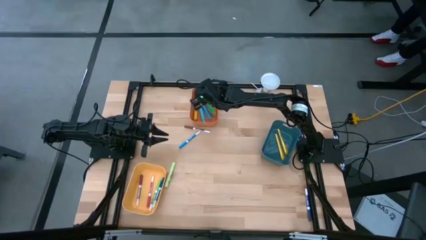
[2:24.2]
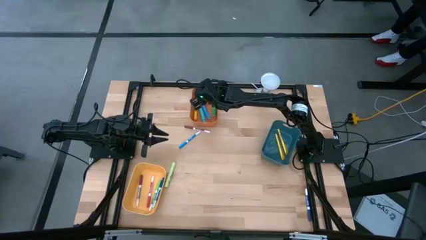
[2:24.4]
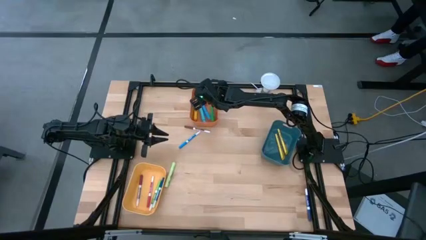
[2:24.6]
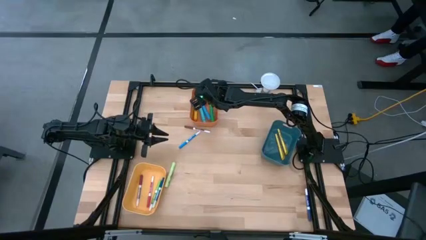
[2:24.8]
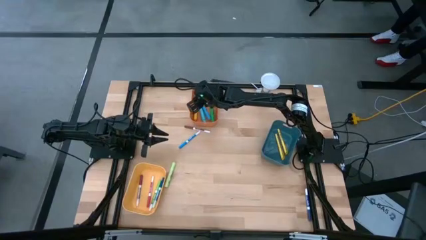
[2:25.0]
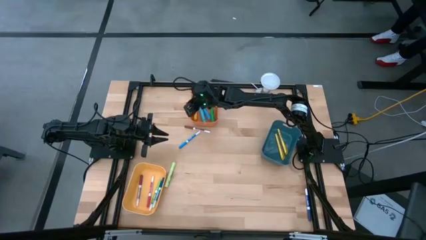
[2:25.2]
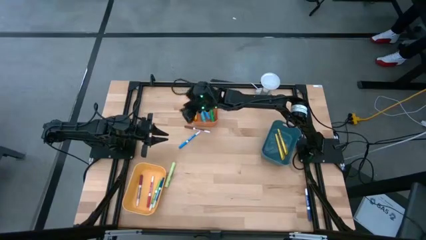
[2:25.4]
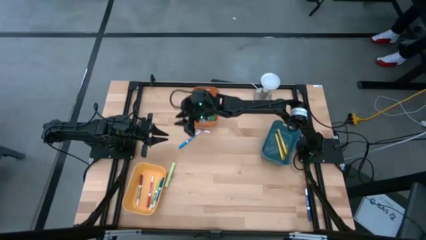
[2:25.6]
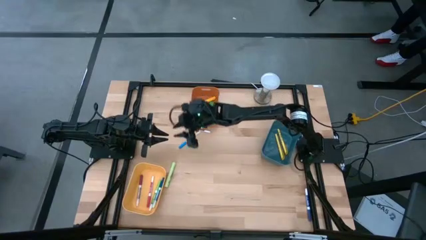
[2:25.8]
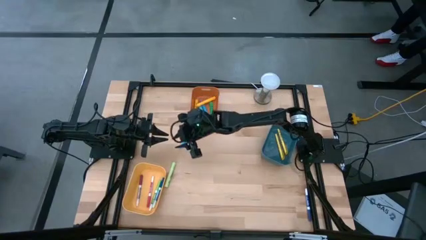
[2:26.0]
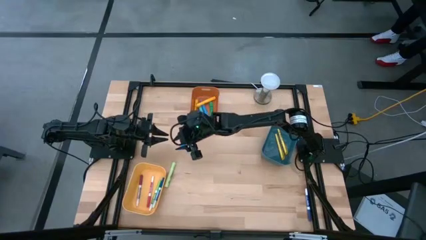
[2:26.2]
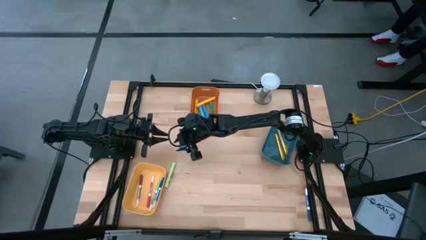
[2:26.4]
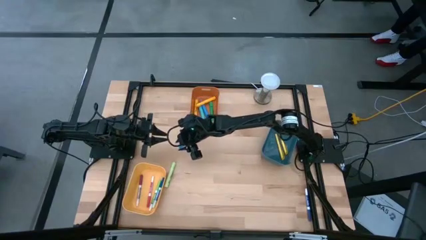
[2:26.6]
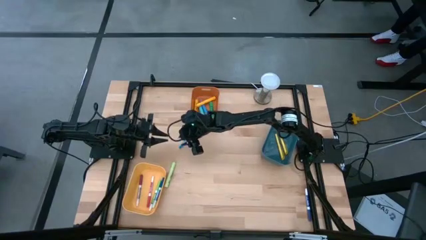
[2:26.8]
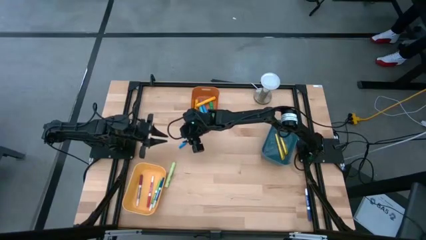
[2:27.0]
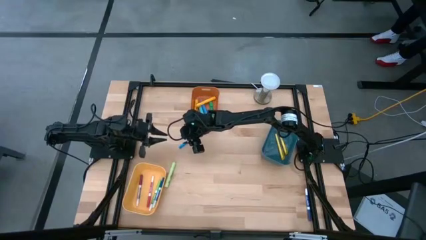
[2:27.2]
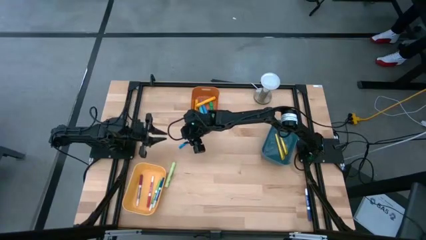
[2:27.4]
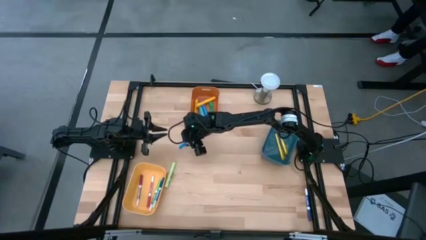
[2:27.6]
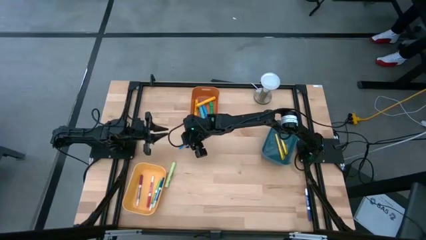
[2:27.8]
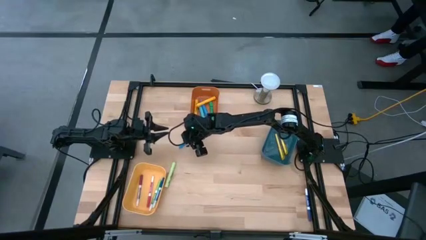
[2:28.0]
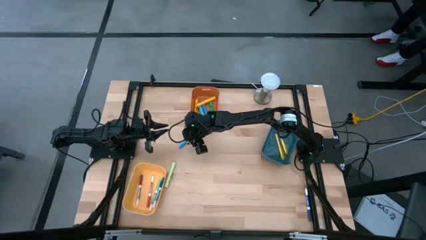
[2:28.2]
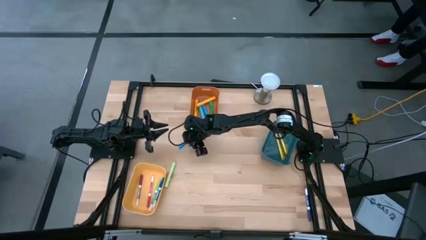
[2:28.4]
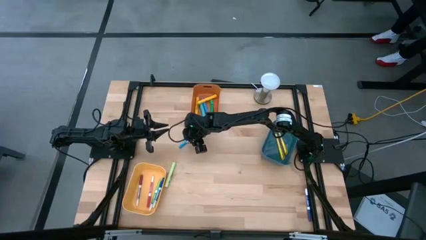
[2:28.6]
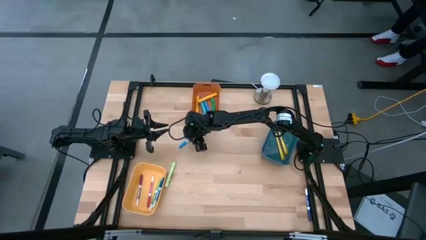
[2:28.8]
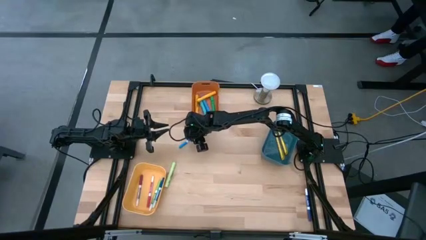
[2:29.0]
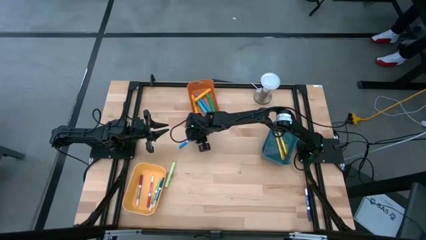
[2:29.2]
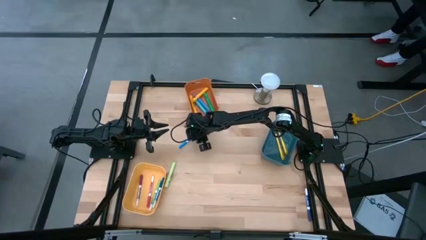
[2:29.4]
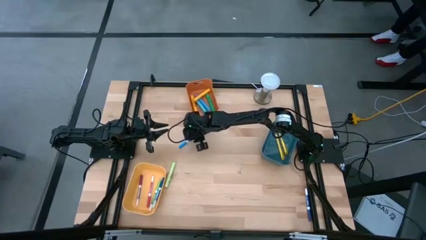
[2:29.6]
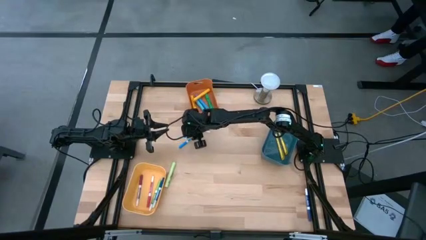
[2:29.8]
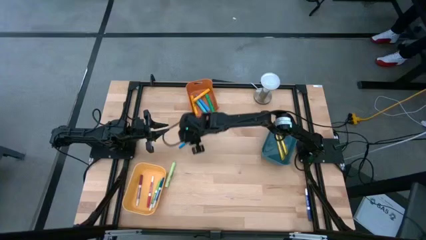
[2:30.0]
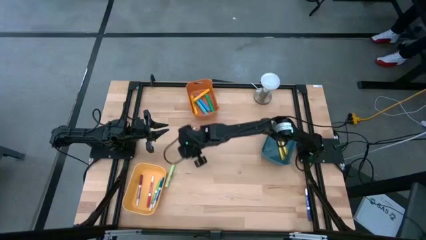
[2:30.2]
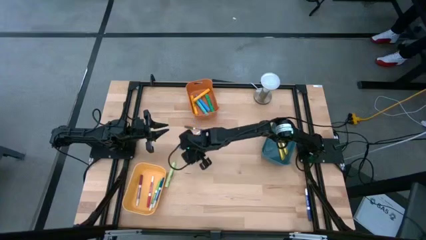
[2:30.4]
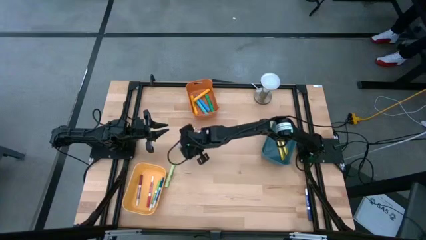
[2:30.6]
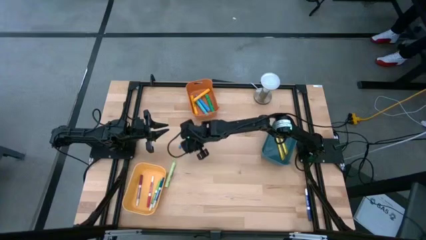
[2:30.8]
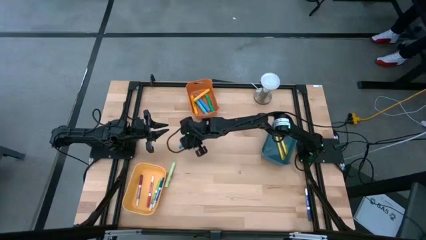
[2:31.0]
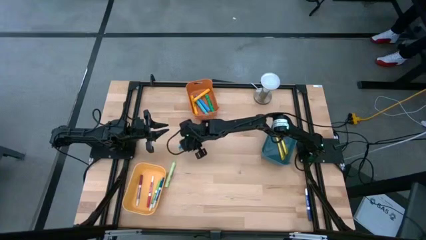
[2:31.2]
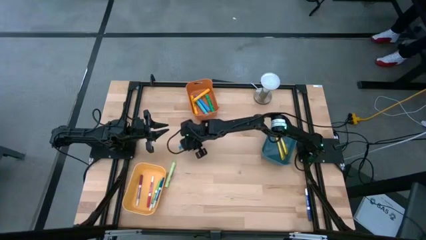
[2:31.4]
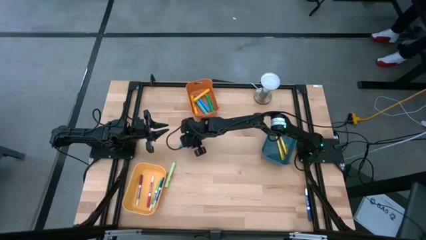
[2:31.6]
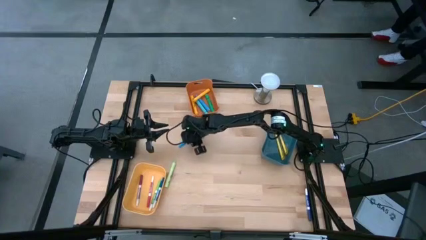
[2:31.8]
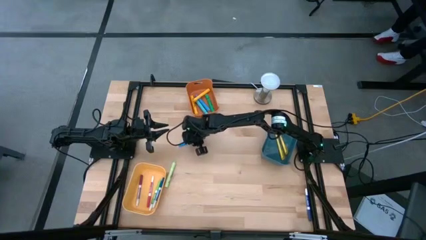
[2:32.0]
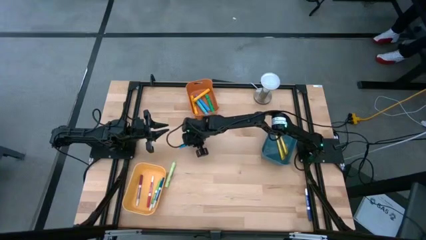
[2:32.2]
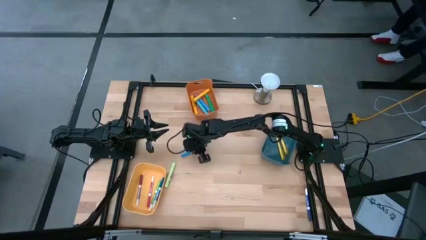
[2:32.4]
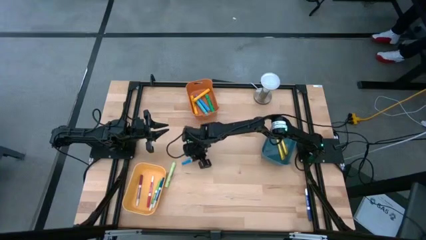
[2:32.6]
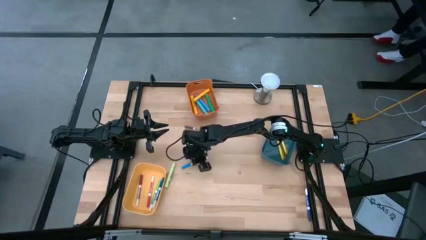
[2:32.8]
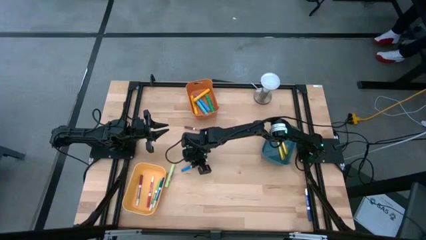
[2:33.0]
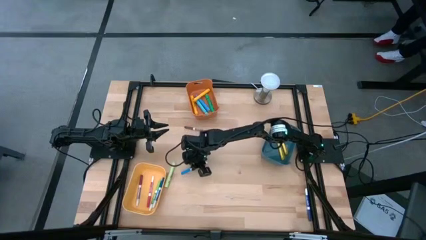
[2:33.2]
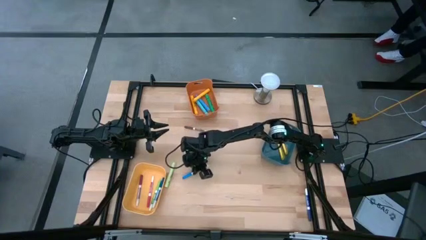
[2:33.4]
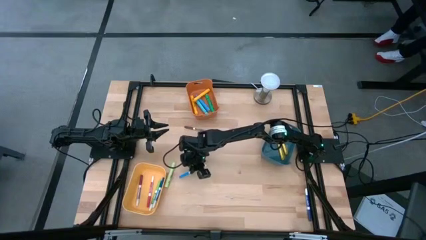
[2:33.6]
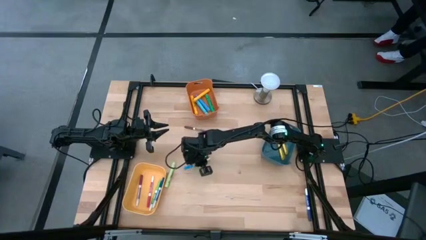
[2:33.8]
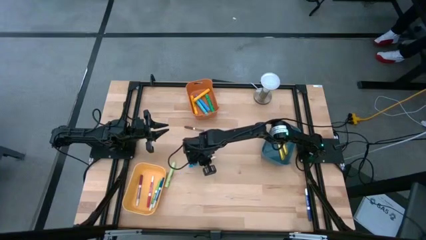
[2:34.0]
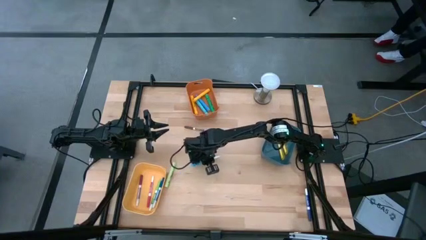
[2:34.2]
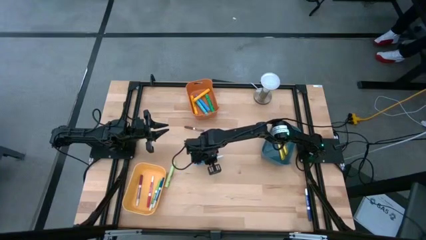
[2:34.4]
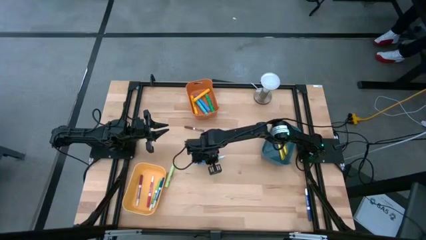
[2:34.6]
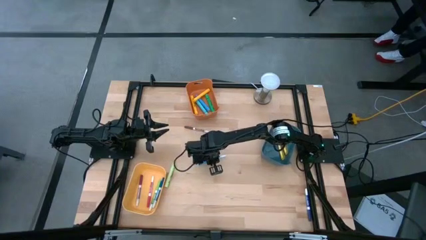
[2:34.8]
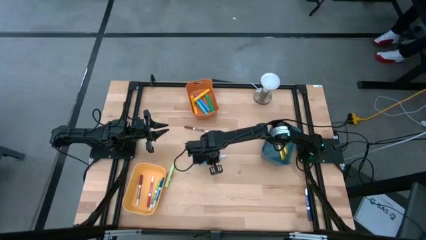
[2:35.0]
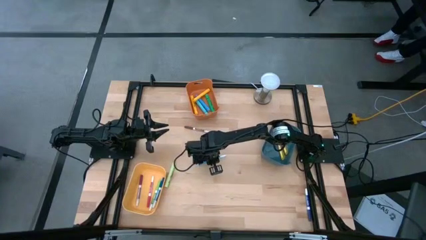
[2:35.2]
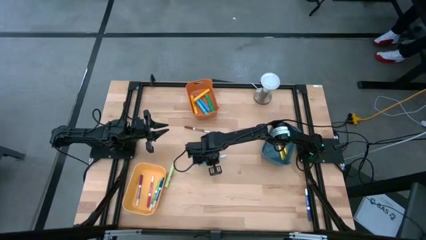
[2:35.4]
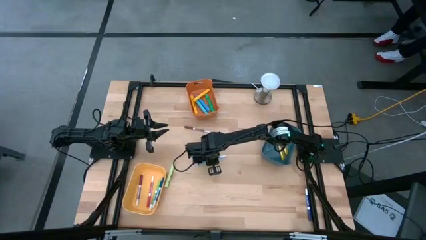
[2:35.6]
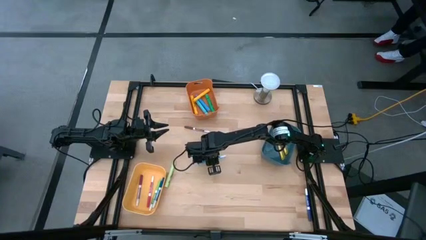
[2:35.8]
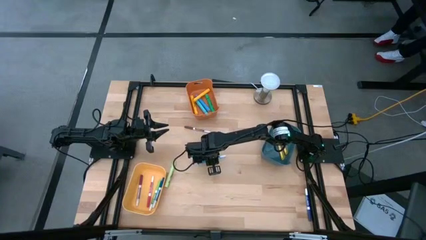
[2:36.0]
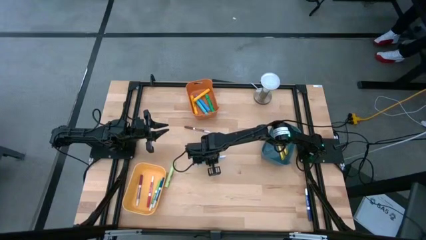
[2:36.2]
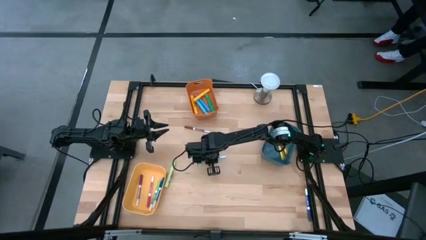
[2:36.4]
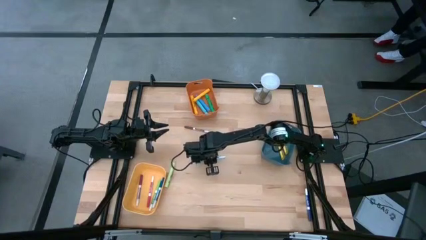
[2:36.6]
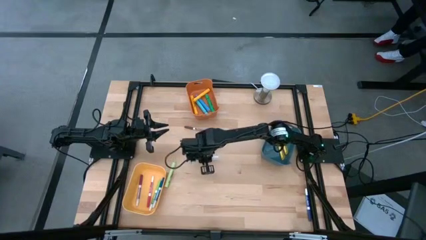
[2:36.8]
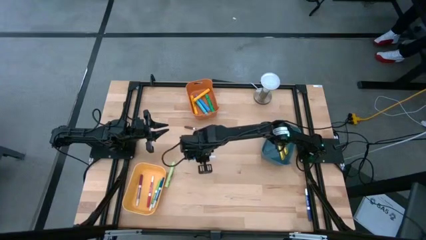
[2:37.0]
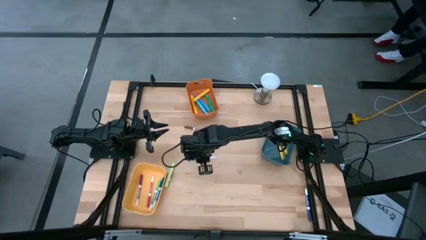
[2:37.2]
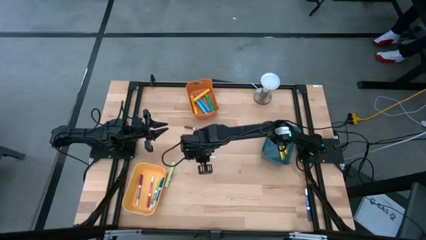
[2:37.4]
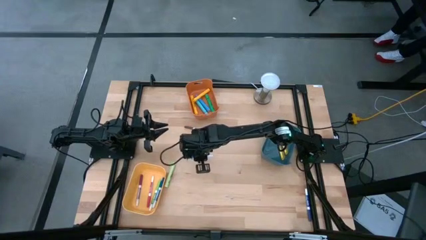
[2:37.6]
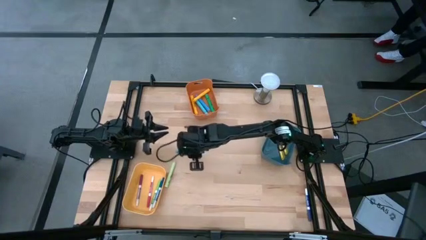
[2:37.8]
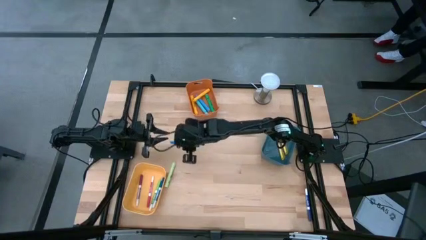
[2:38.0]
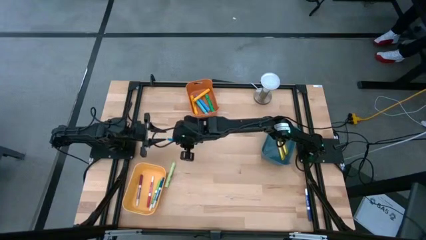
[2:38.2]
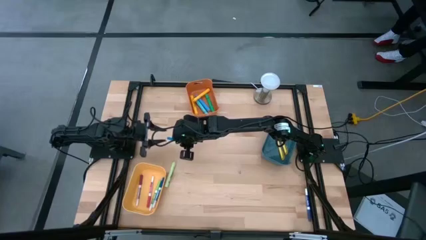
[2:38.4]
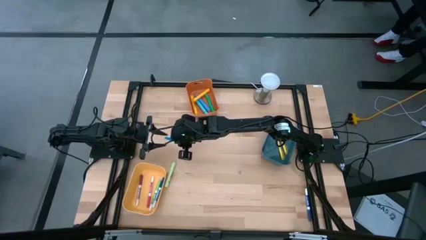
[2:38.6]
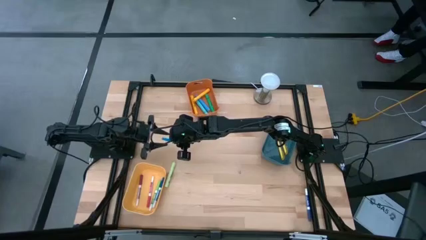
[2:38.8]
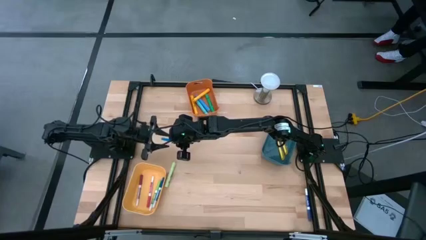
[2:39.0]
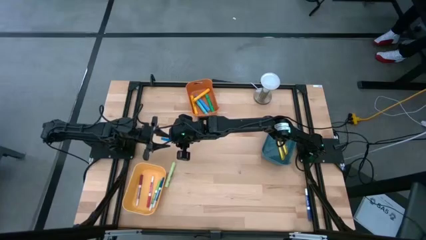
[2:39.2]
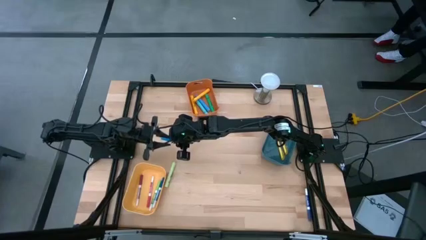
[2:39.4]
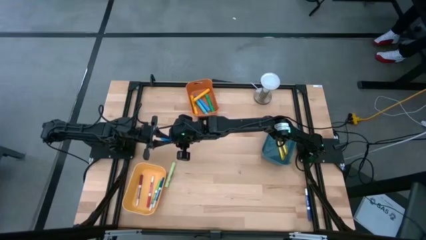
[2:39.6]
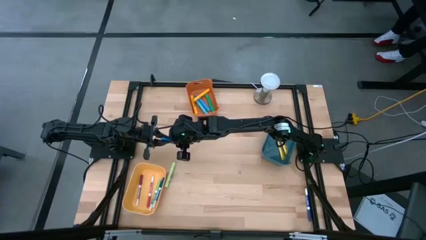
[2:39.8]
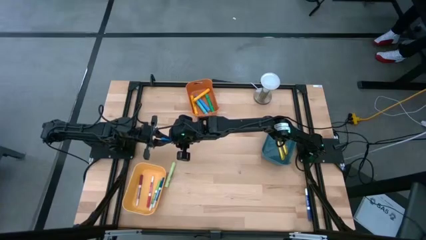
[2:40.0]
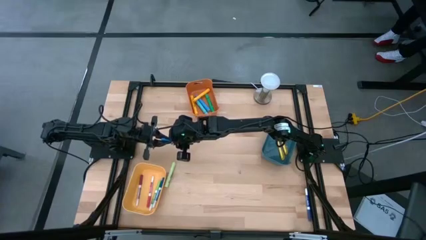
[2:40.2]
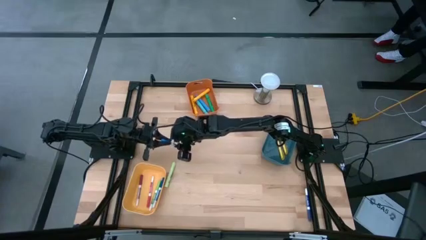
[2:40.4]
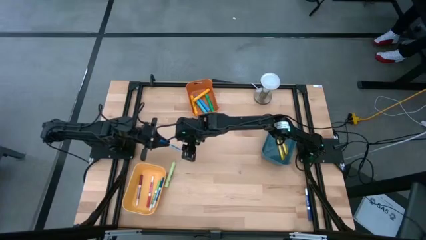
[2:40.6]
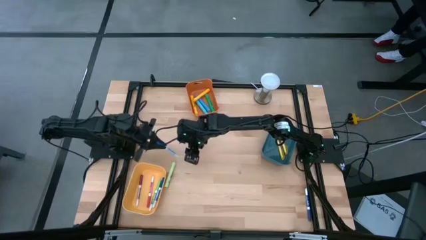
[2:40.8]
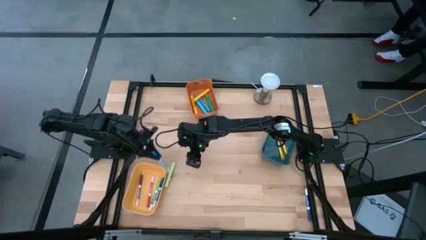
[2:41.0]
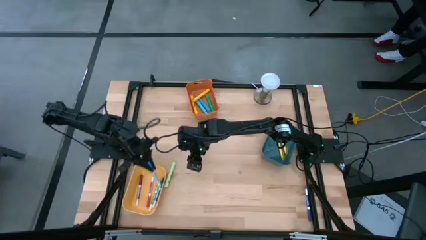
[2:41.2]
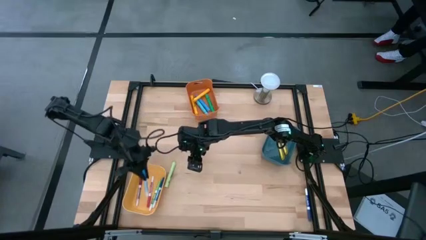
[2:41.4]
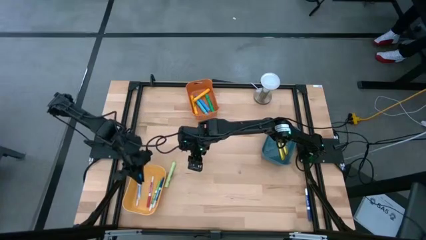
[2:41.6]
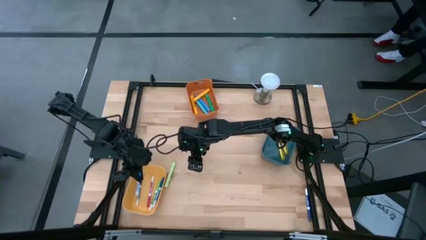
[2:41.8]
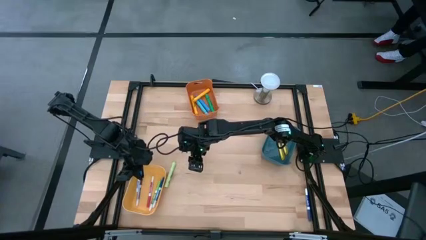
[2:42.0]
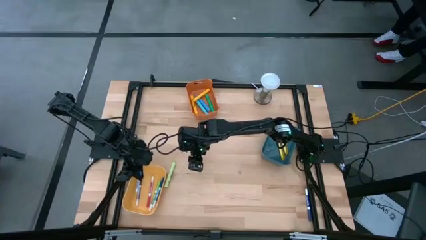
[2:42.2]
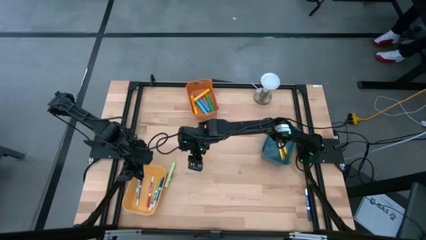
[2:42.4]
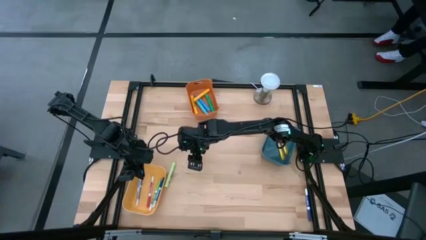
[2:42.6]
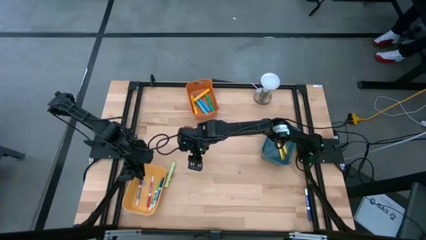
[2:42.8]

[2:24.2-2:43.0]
Task: Pick & Place Markers
Put the light blue marker pen into the yellow bin
